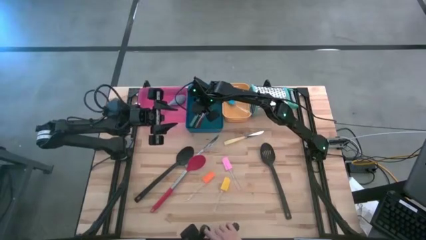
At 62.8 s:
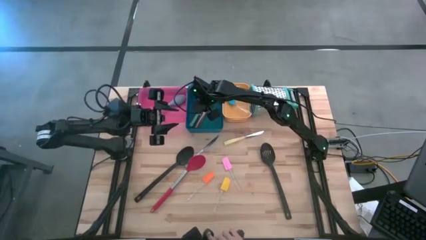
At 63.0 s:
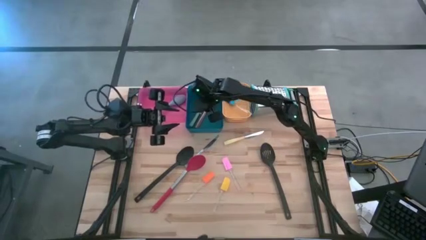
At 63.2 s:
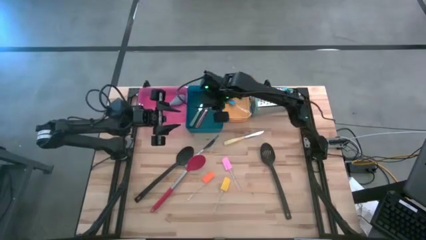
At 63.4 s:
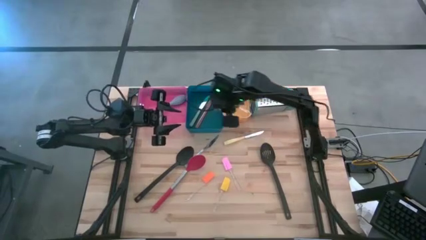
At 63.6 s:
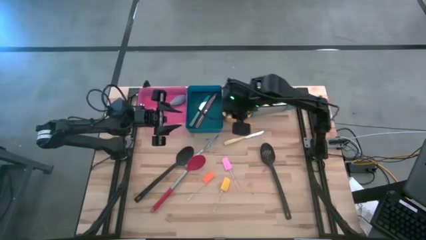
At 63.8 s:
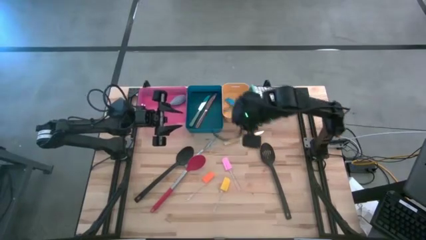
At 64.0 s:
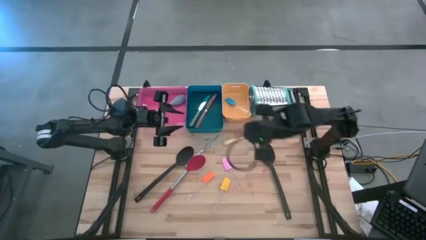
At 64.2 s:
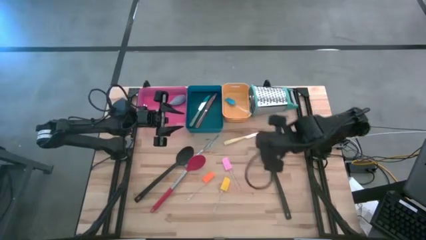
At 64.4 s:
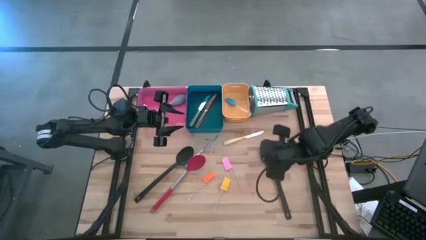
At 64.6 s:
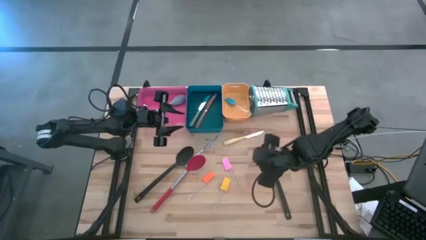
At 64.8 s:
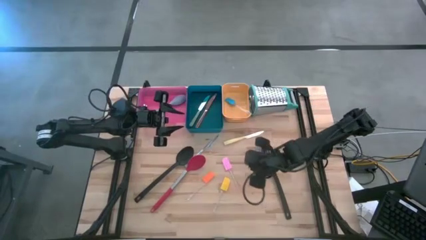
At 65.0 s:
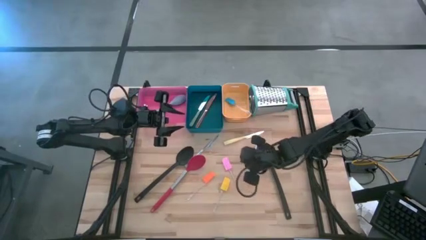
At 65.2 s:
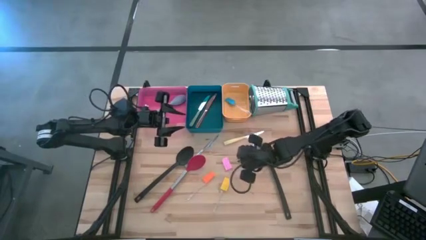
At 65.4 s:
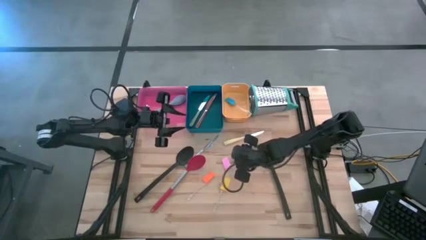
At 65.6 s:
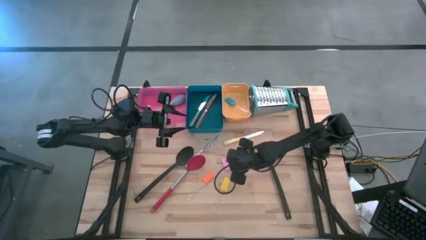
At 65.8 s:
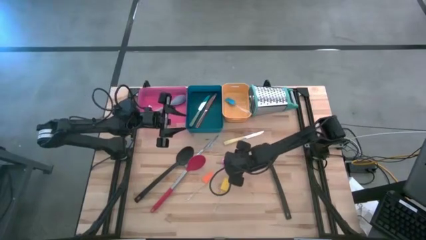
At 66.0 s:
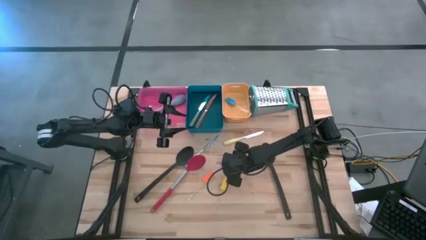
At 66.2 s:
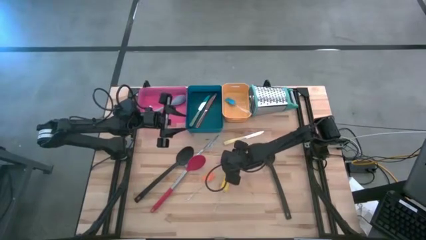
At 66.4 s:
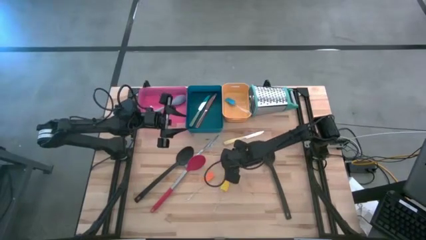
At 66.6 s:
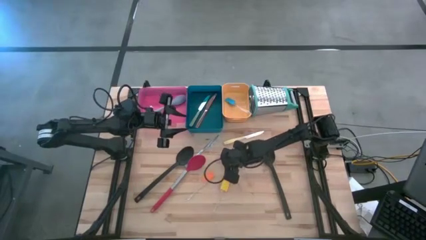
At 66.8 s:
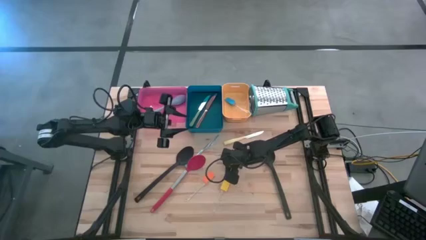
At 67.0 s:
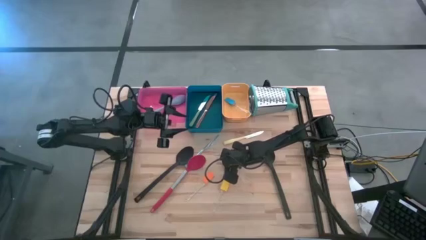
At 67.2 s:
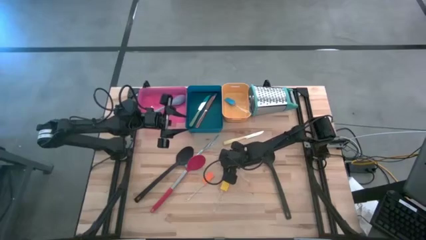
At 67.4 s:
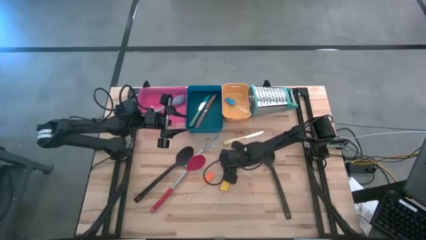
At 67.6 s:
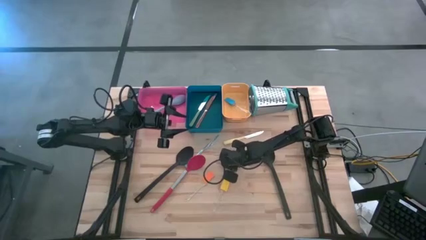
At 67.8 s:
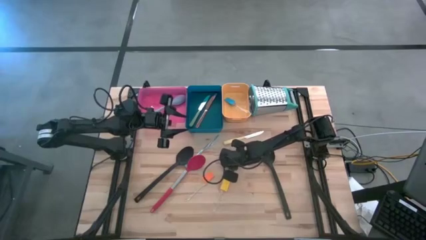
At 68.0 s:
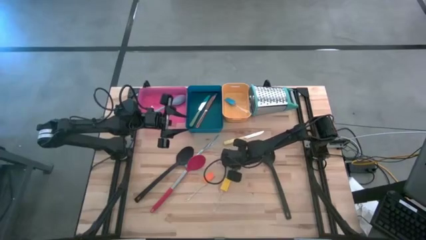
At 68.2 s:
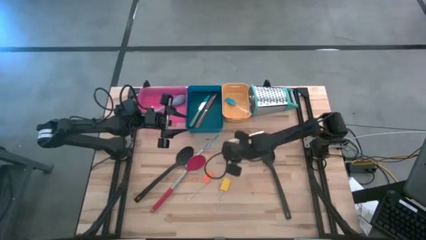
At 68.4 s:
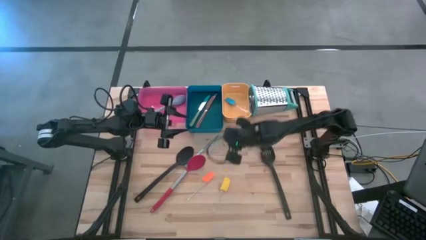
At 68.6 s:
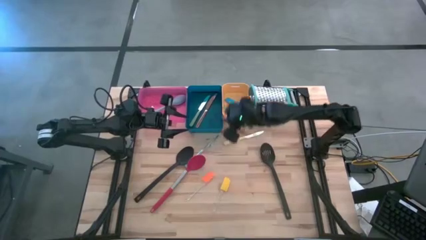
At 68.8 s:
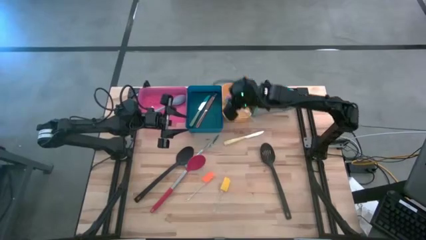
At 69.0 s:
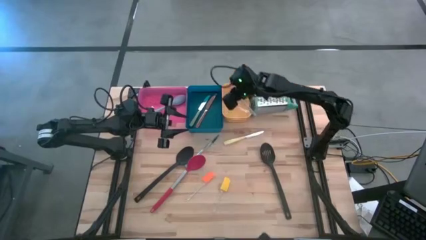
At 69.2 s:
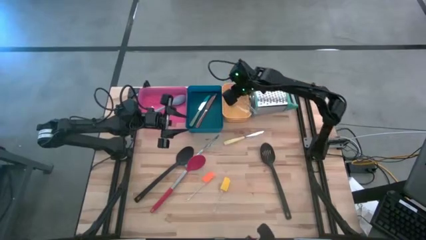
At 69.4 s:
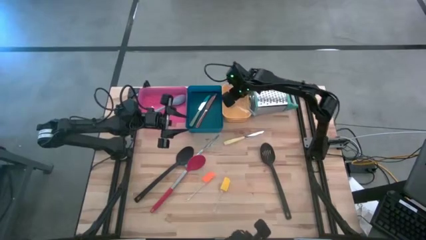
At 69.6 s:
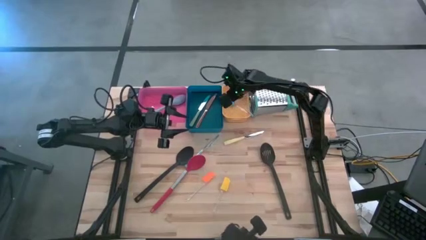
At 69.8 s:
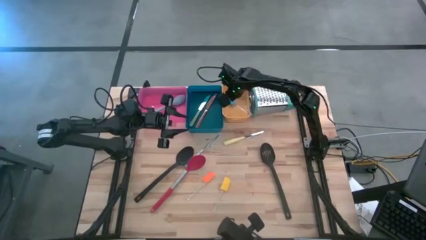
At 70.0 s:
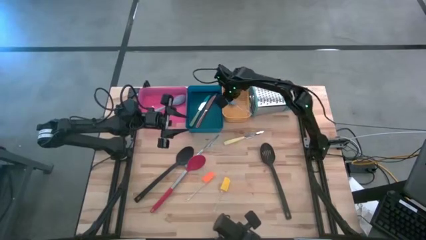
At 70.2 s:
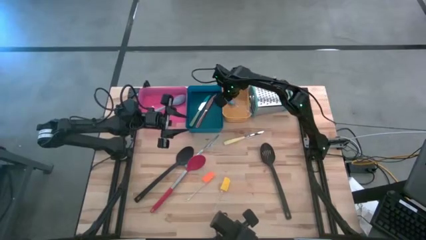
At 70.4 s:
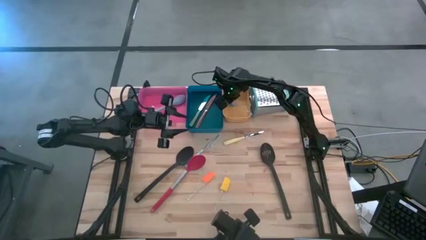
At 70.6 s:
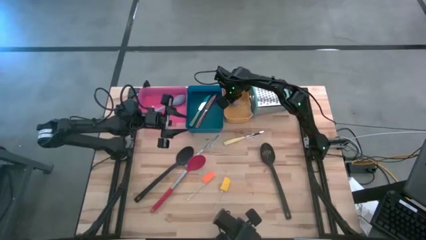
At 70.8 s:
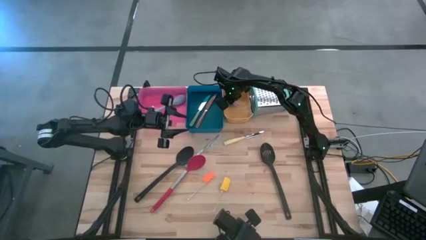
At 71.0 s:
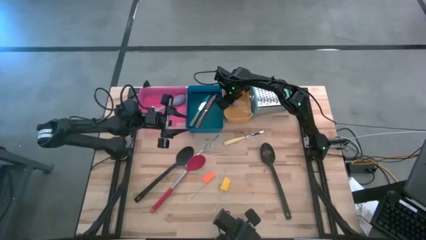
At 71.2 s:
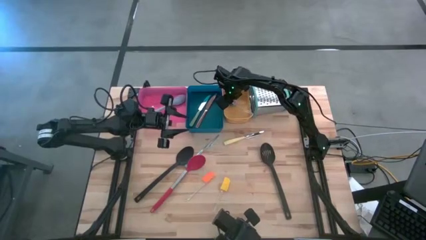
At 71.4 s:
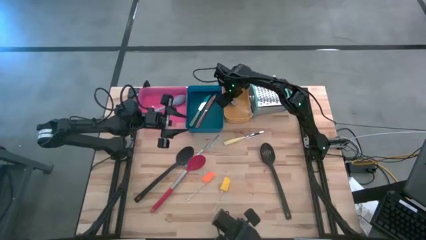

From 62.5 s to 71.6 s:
Task: Pick & Place Kitchen Items
Put the pink spatula into the yellow bin

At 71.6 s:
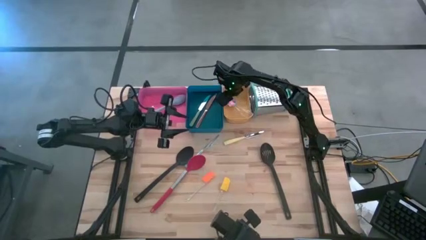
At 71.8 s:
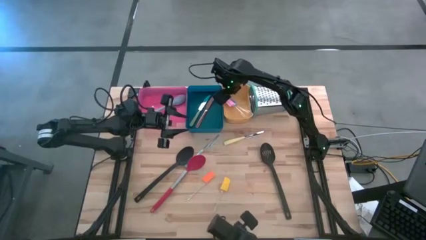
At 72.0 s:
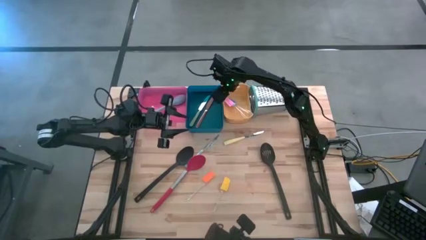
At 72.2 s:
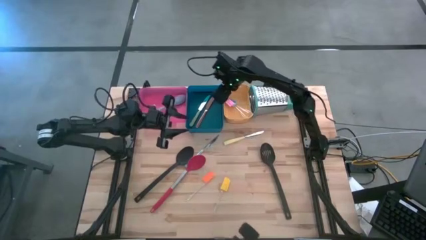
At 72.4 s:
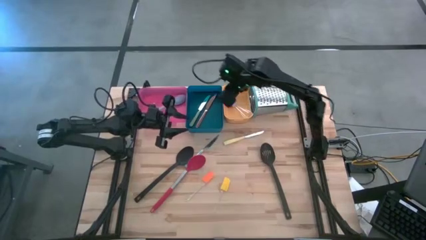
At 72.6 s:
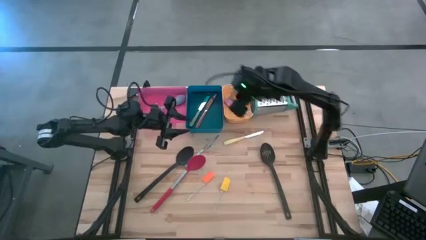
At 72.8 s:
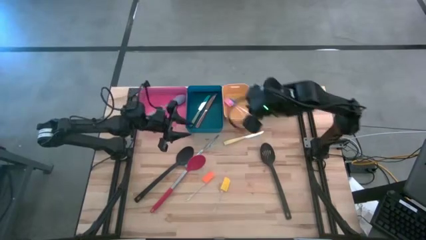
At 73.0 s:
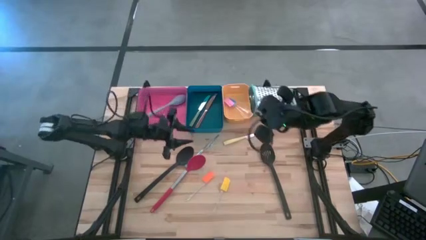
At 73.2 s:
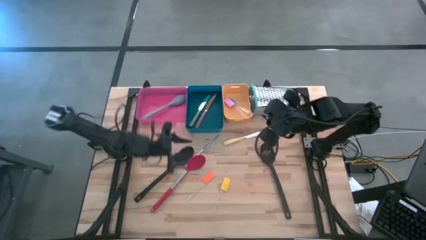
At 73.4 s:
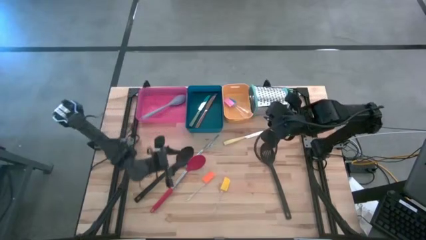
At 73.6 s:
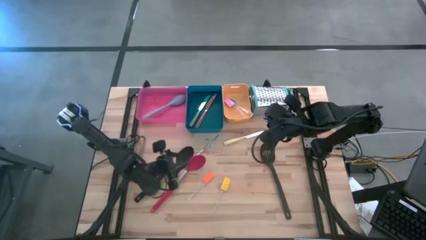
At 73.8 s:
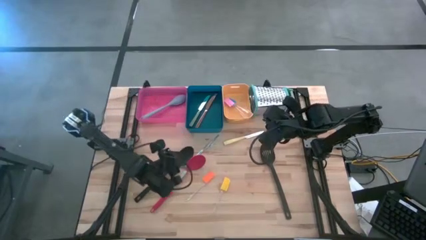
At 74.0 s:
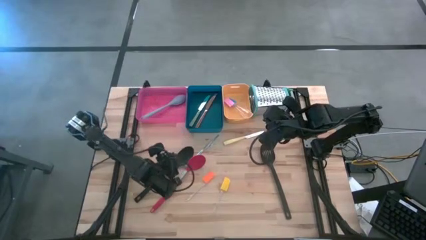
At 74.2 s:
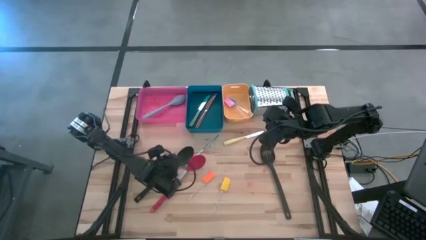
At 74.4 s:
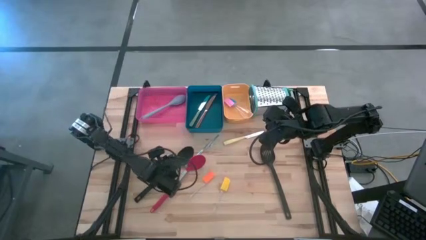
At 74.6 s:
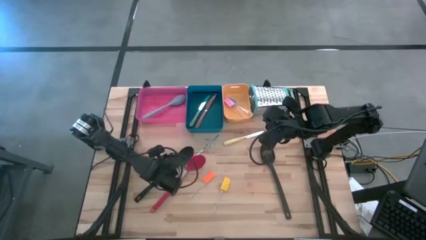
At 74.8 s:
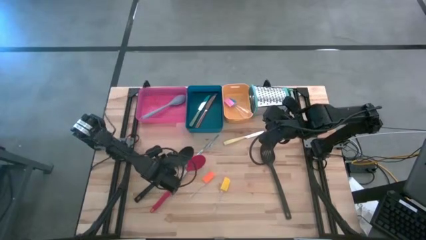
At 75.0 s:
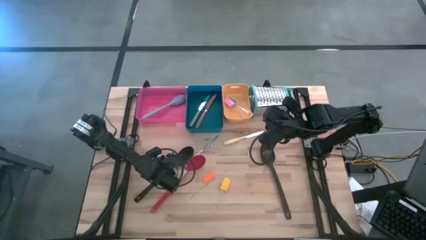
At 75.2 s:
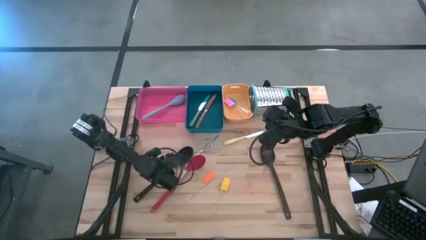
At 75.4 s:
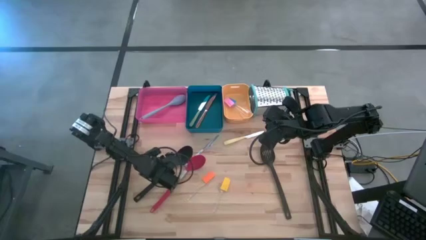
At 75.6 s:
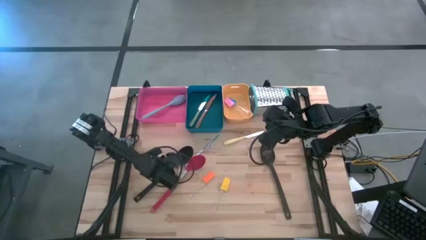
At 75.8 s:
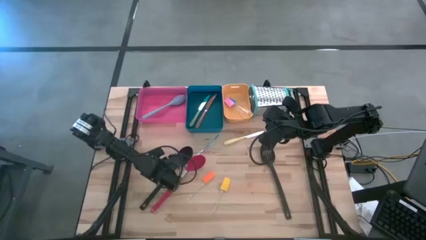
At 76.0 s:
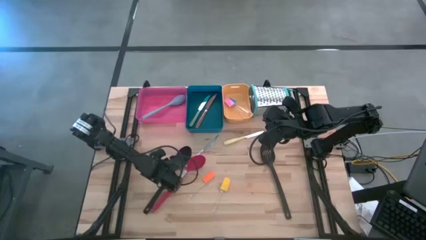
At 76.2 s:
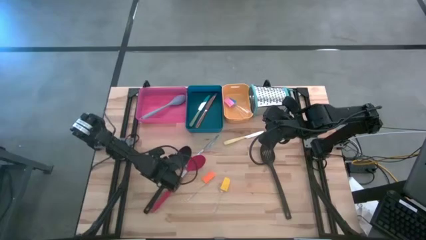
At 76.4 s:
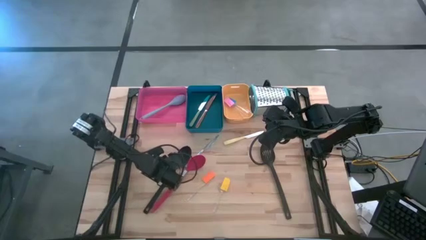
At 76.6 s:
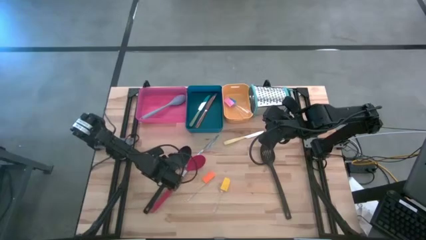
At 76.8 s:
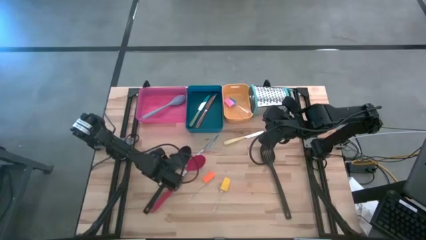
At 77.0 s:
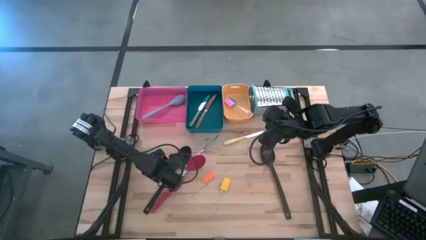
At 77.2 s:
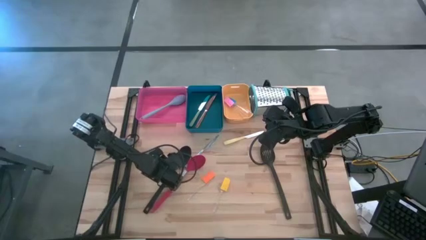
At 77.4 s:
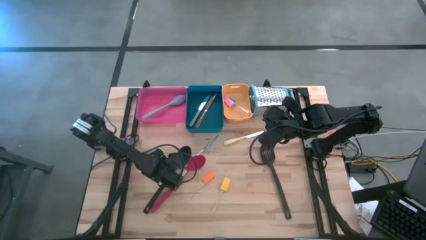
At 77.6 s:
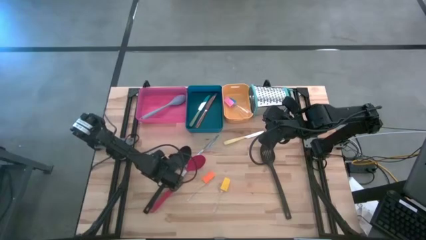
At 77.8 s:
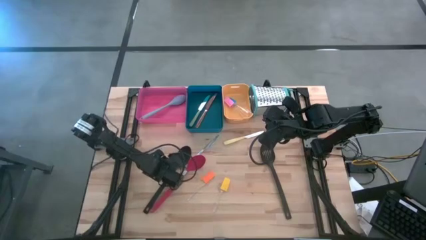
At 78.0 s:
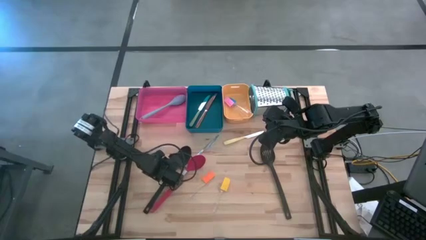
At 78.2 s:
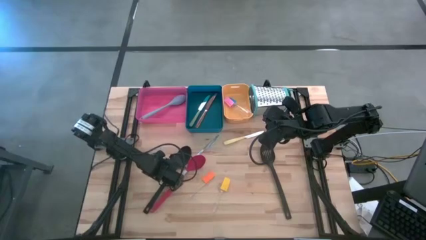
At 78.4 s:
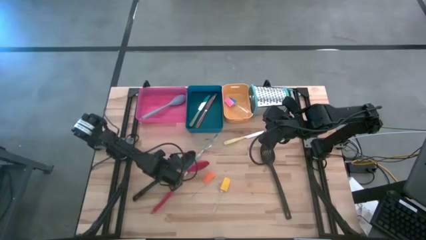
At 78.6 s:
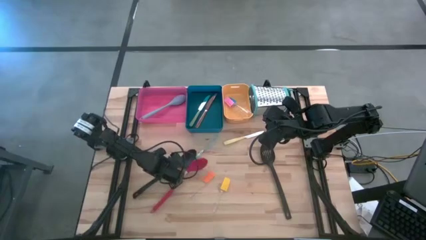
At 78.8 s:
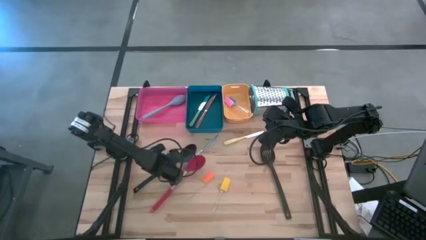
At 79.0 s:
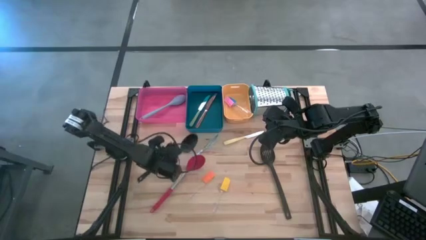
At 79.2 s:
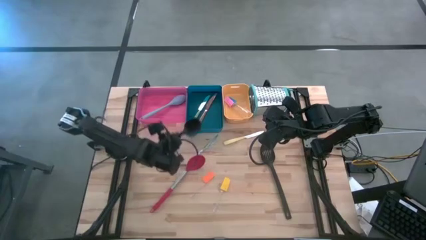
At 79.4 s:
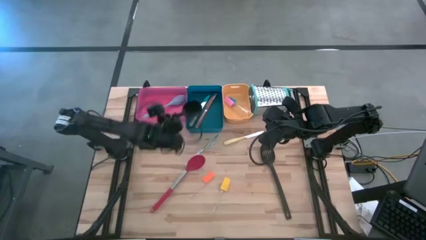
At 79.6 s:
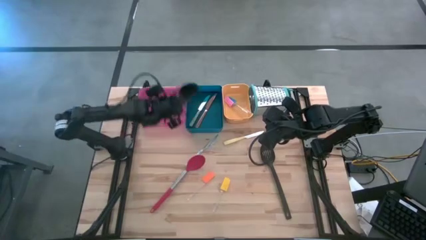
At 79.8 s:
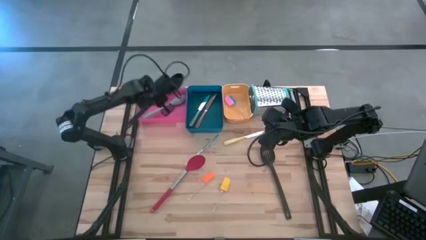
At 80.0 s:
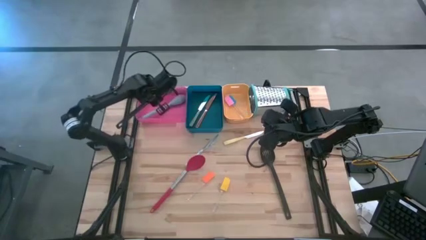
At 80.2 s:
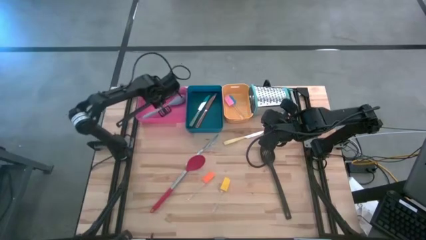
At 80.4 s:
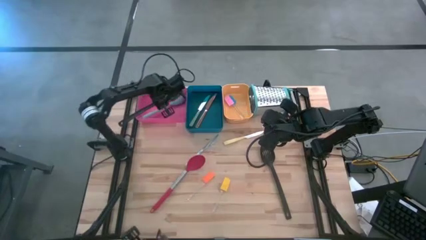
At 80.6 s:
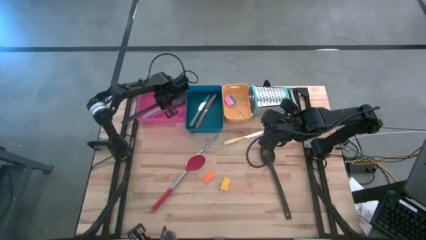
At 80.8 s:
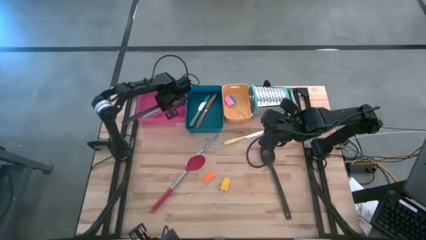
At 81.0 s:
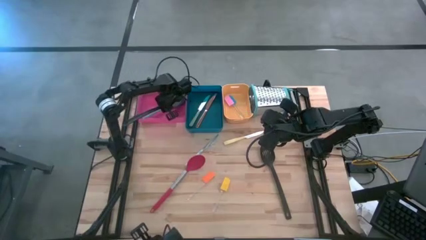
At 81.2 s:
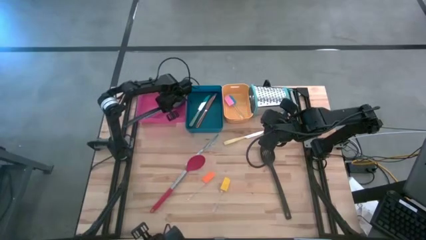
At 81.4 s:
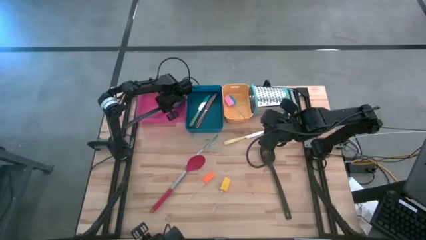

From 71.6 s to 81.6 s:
Put the black serving spoon into the pink bin
